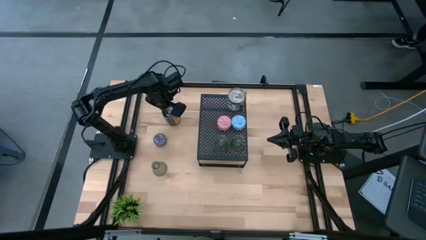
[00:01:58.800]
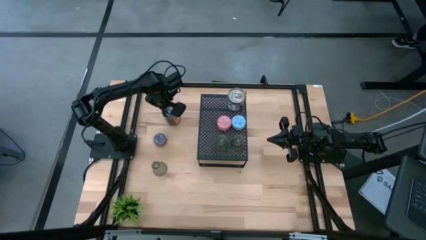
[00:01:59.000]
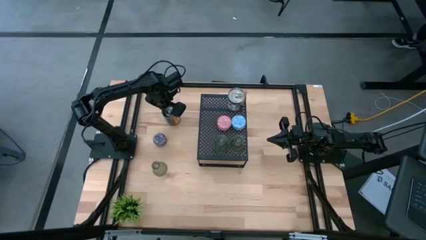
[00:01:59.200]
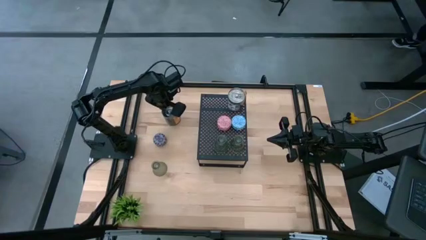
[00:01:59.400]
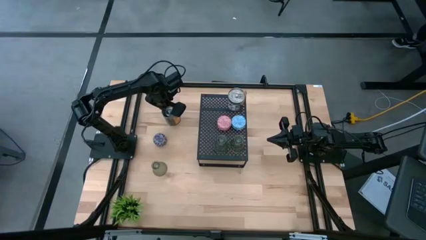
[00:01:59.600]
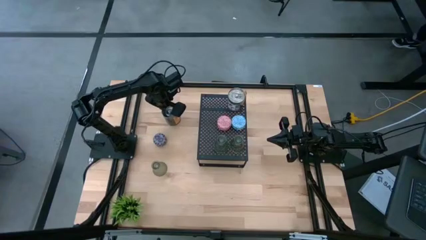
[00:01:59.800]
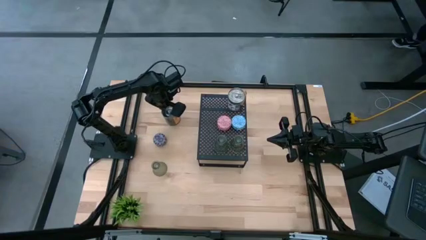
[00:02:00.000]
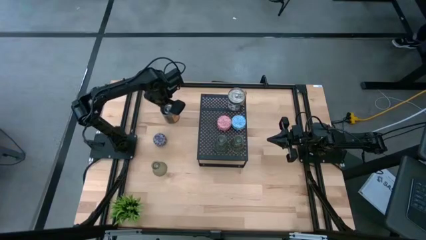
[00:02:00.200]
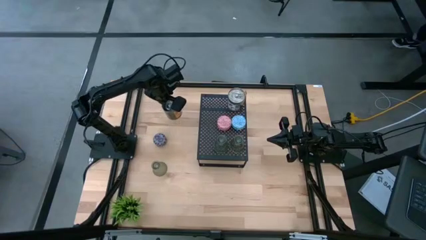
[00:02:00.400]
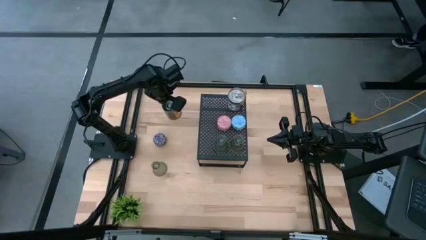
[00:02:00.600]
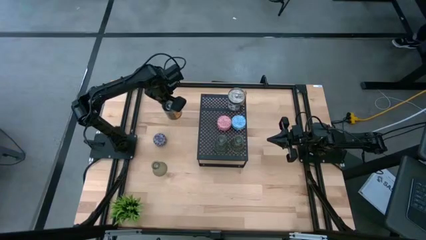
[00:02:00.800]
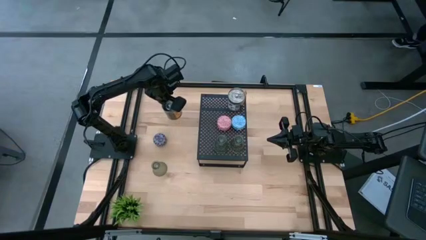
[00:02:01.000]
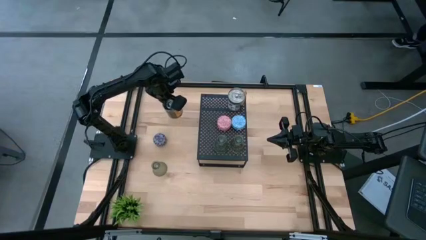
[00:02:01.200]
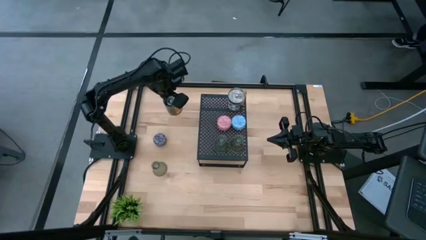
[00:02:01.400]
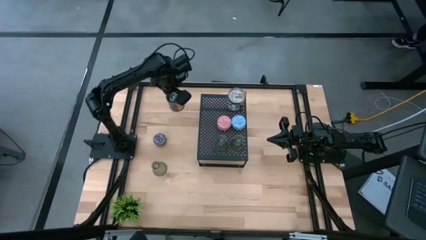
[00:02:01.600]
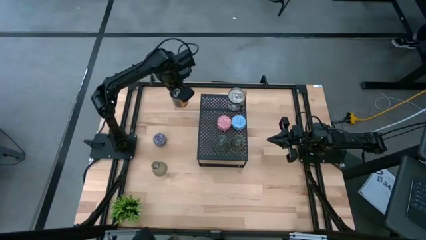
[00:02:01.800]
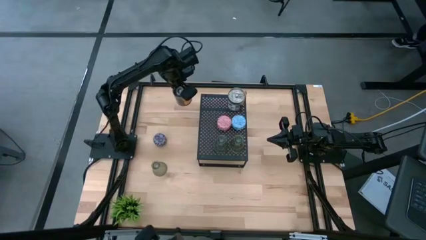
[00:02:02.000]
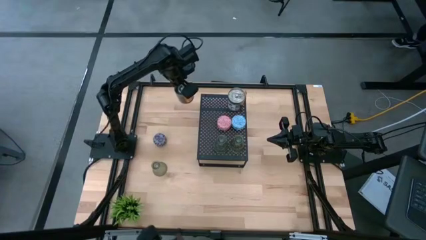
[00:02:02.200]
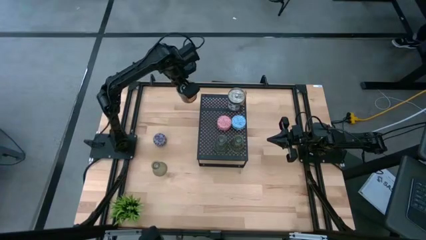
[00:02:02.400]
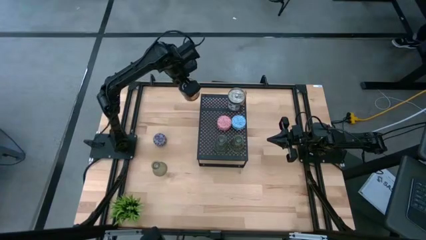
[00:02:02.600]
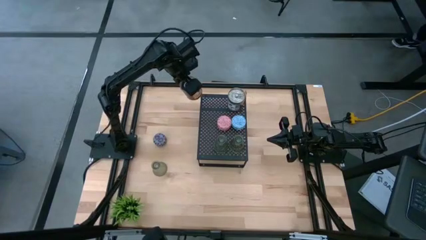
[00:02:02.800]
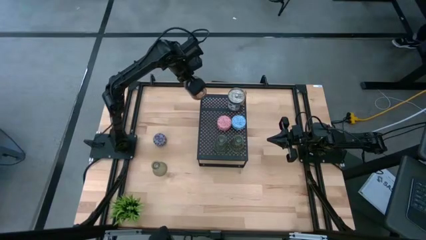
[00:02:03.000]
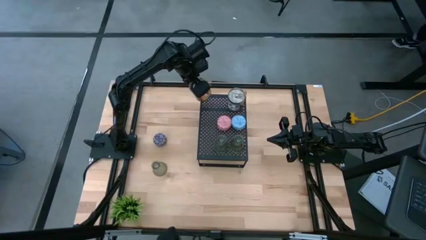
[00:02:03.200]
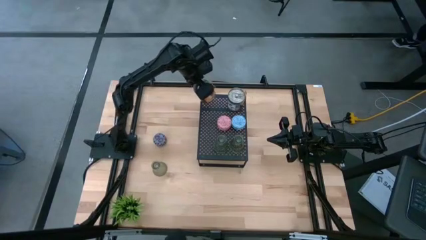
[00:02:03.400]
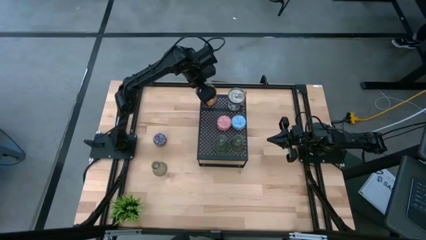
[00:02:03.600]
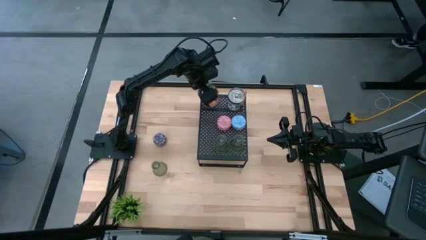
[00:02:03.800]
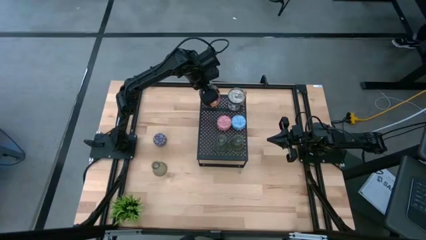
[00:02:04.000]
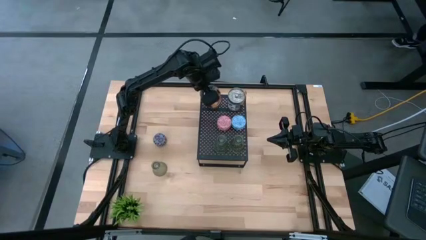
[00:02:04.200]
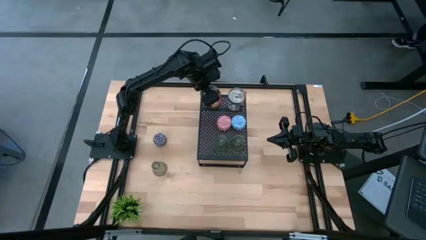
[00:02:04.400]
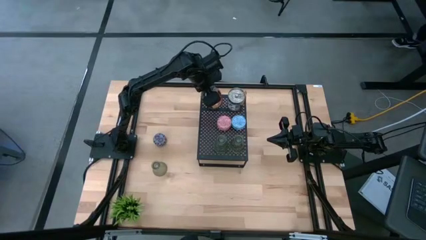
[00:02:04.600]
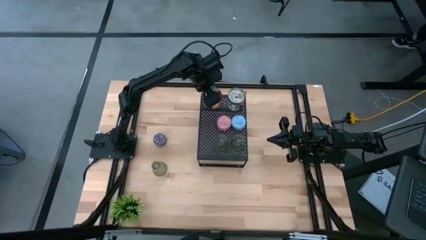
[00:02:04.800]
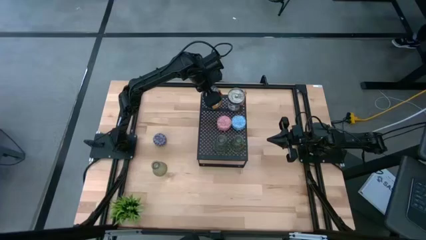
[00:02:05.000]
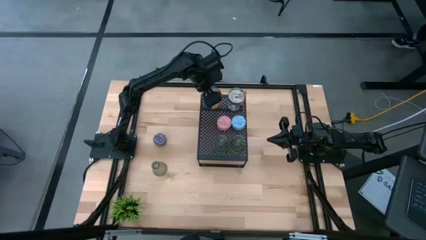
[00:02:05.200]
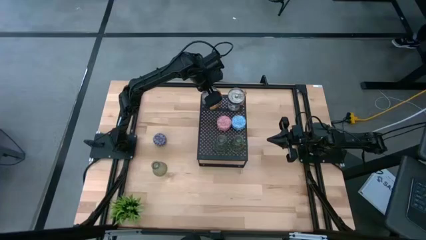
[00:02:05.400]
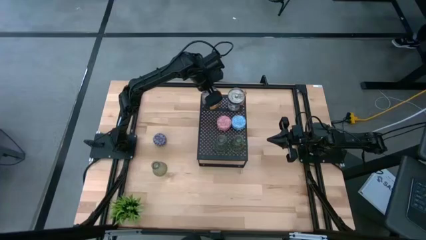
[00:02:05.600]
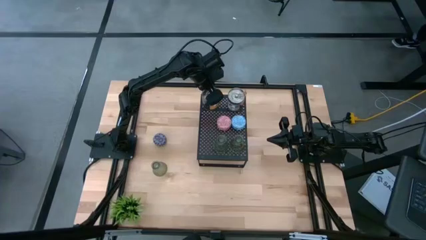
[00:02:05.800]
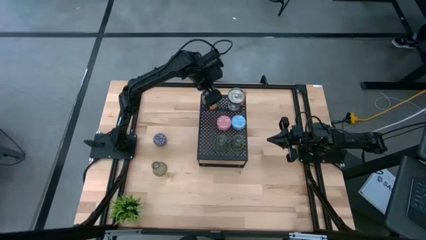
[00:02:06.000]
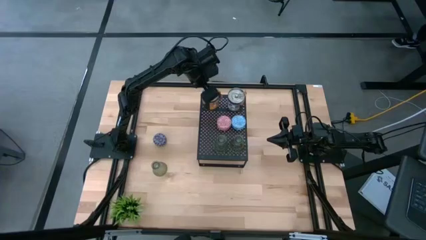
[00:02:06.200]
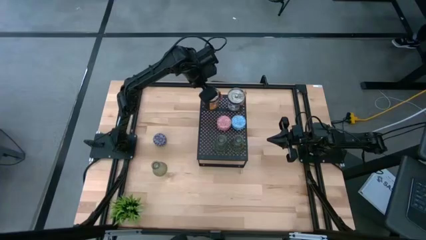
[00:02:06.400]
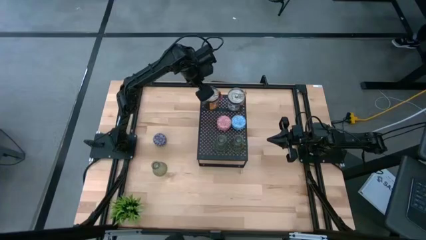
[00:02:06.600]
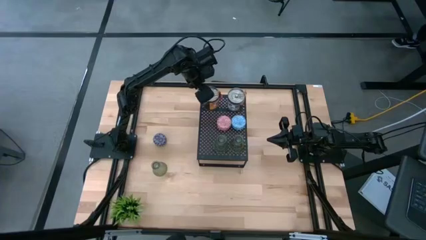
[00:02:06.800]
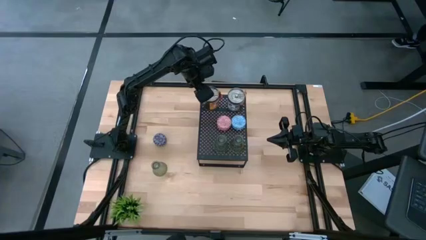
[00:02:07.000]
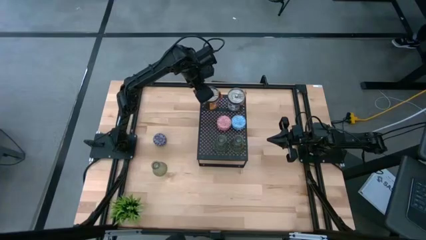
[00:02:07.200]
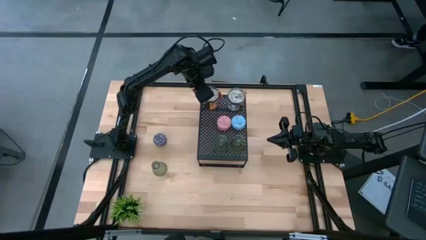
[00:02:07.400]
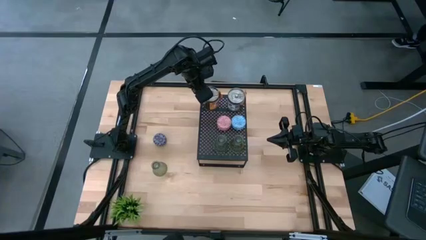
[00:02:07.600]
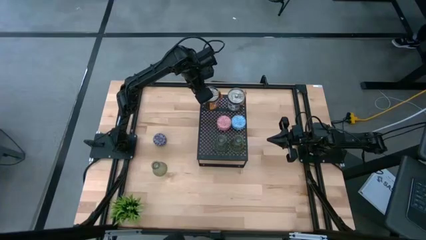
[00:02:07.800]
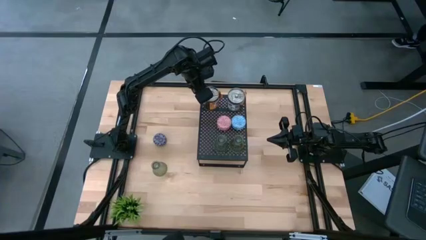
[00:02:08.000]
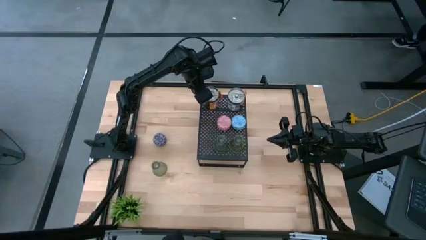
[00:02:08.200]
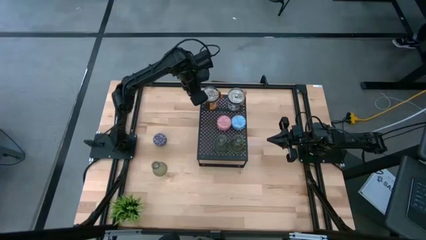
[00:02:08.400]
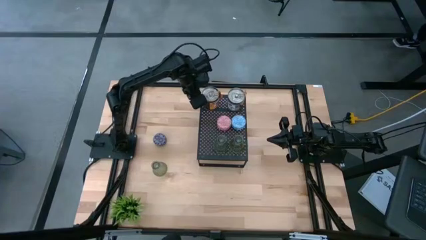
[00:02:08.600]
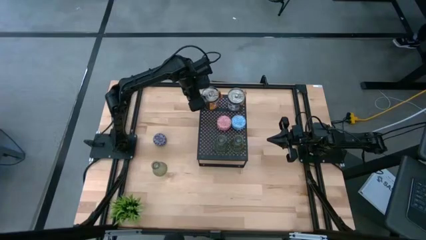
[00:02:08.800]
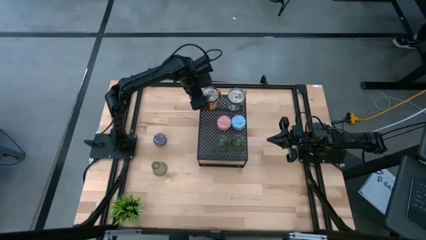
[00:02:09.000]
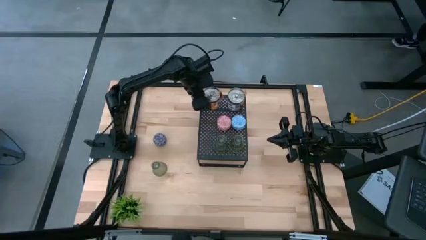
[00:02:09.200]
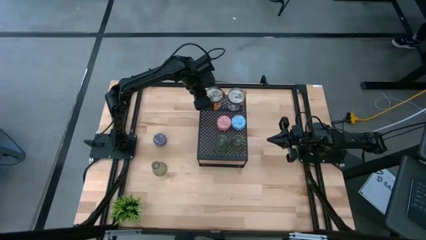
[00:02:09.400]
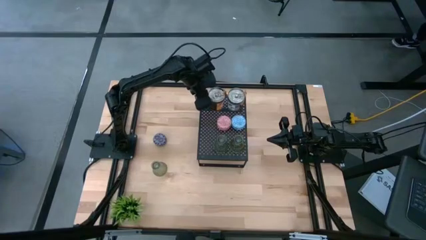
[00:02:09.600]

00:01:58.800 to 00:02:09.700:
Task: Pick & Place candle stick holders
Put the orange scented candle on the shelf aligned with the other brown scented candle
